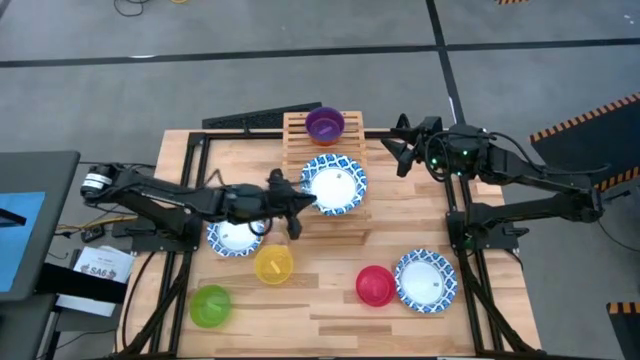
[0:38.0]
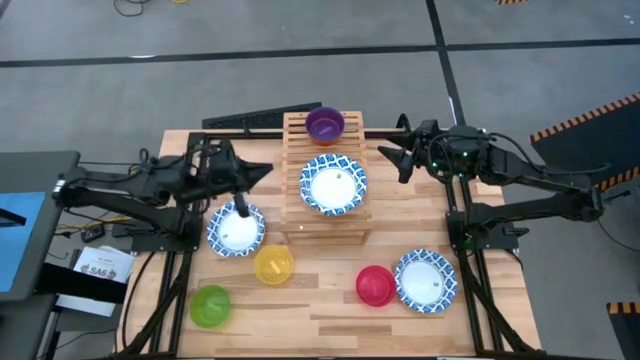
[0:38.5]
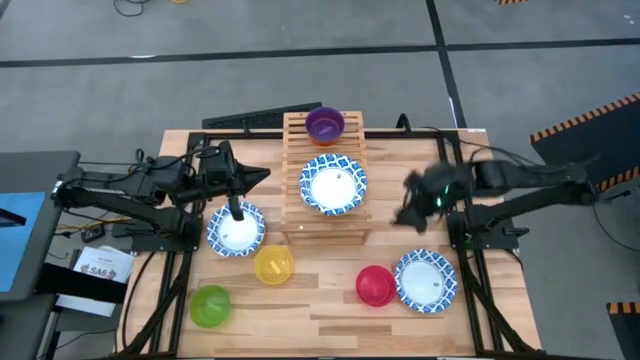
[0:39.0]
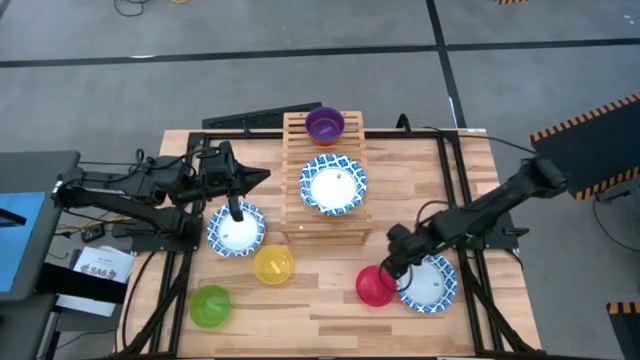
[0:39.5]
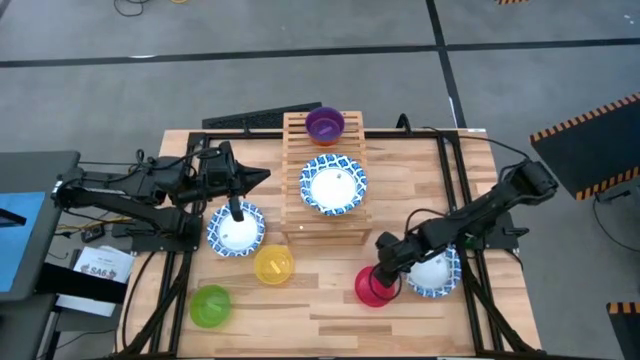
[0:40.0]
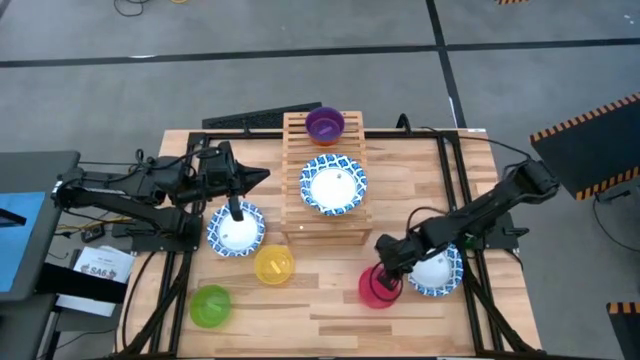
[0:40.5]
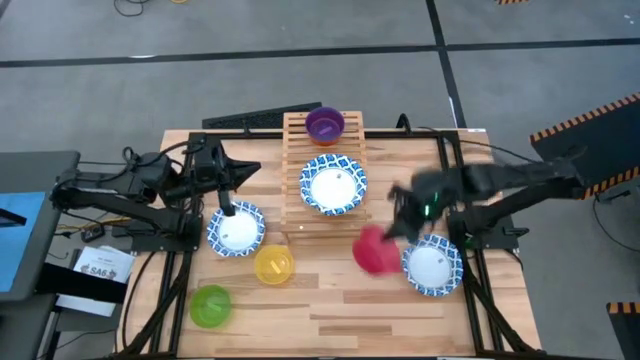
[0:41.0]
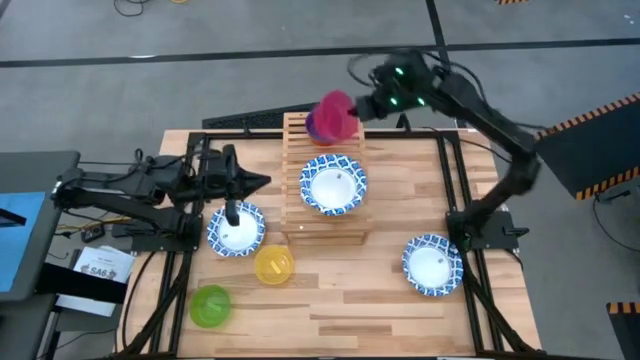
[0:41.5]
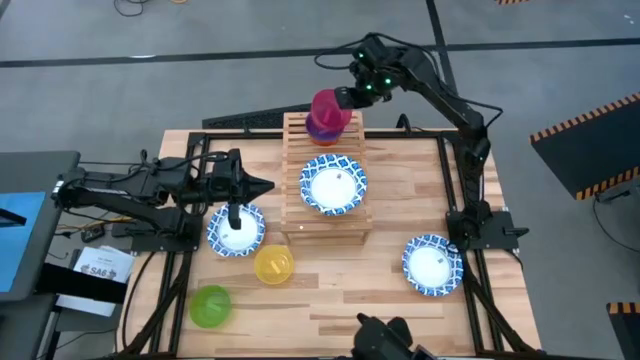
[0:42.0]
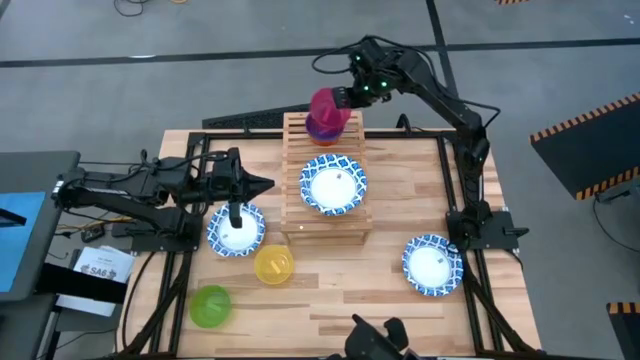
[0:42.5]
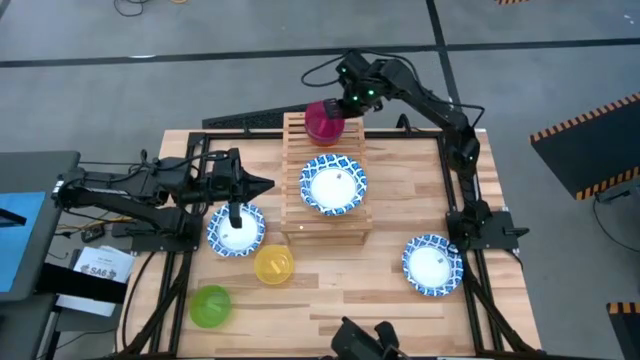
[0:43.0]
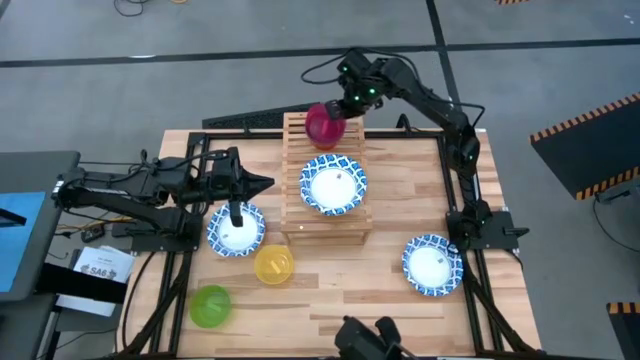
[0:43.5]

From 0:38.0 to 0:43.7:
Task: Place and stack bowls onto a shelf
Stack the red bowl on top of the violet bowl on the shelf

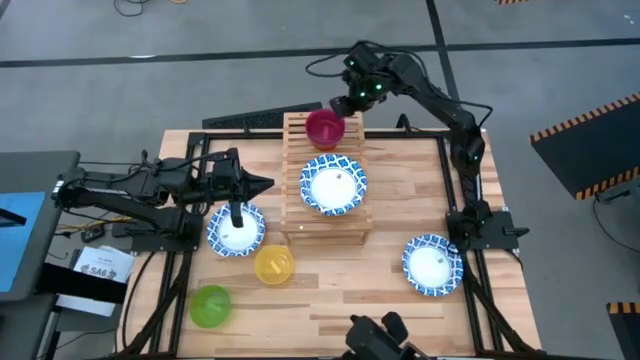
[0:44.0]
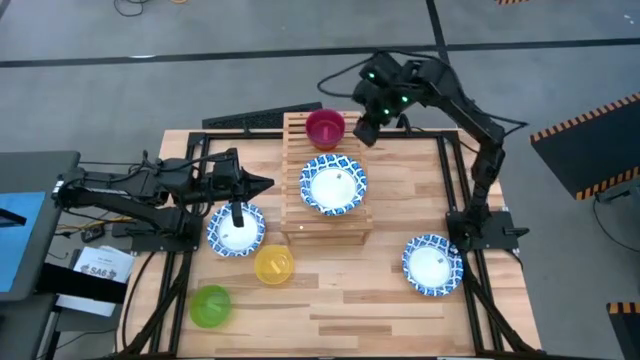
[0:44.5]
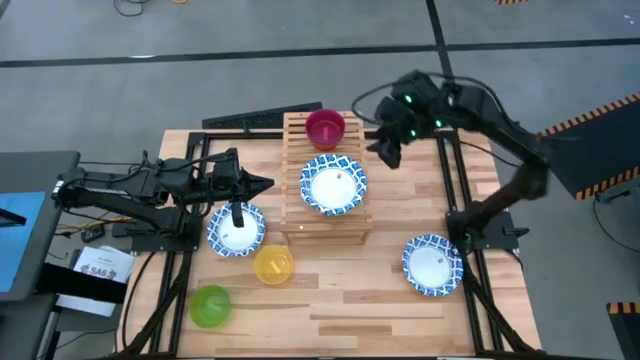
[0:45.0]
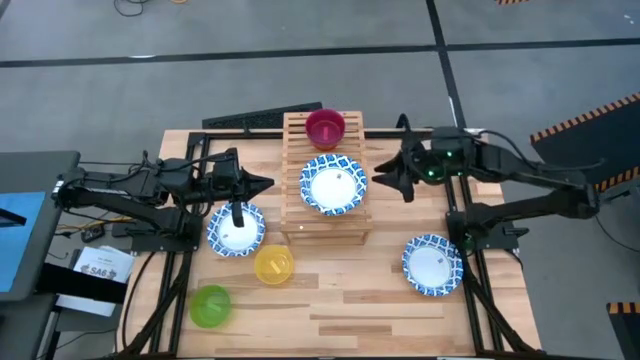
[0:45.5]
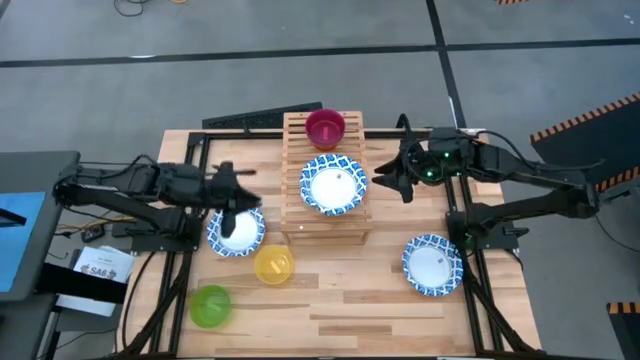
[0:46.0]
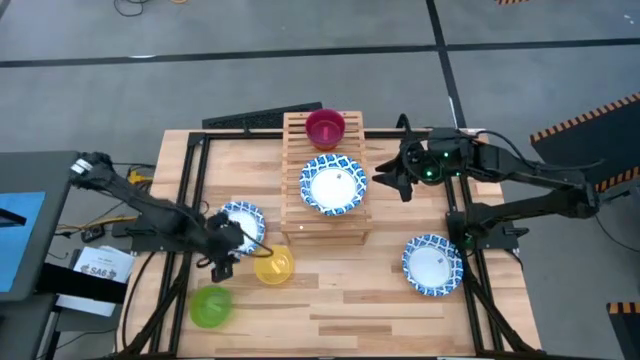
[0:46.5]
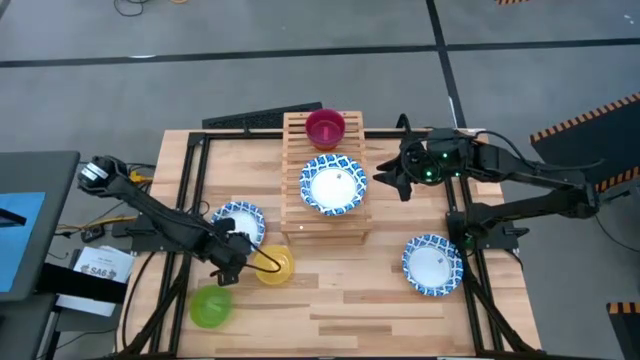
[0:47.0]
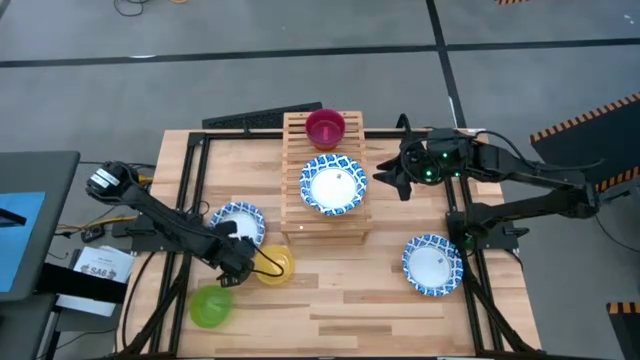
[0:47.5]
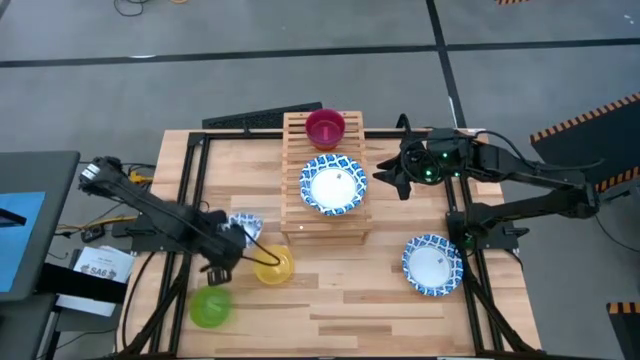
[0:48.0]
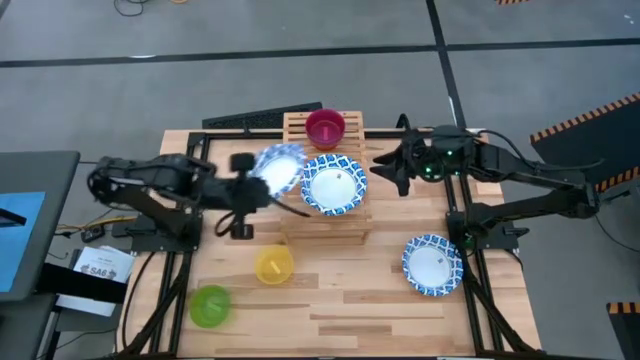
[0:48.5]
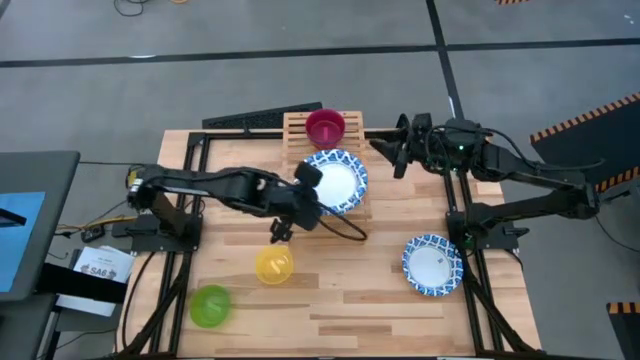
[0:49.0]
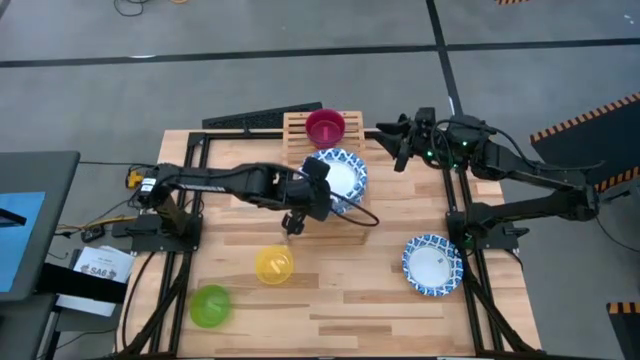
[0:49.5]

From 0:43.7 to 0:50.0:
Stack the blue patterned bowl on top of the blue patterned bowl on the shelf

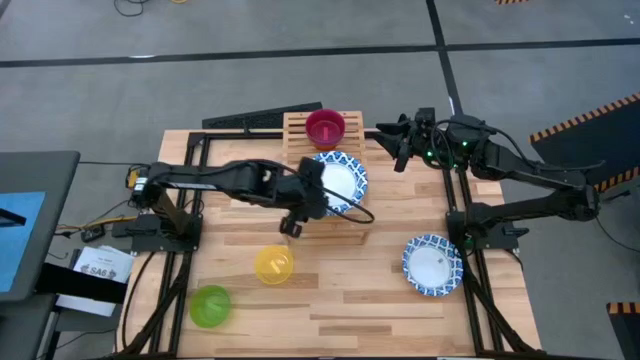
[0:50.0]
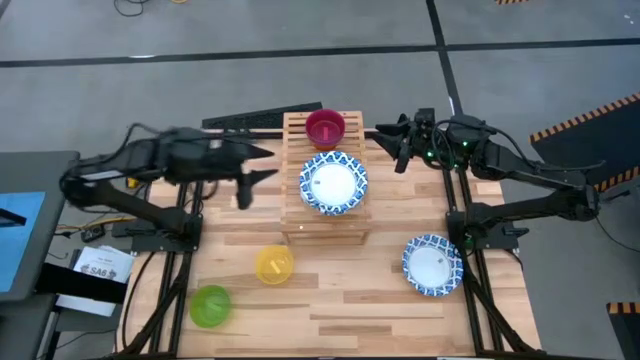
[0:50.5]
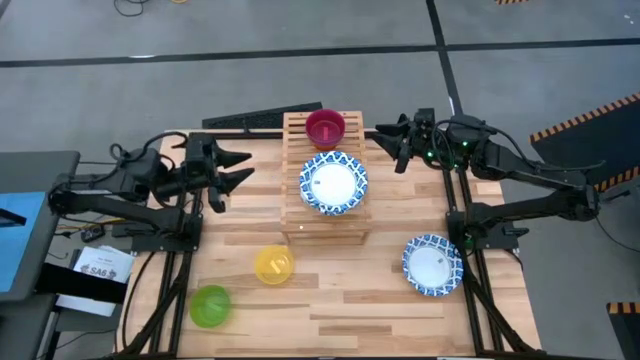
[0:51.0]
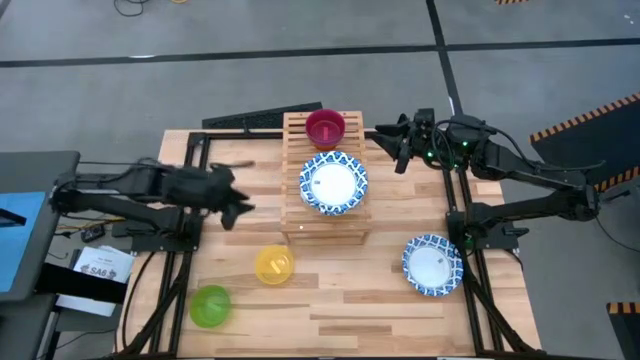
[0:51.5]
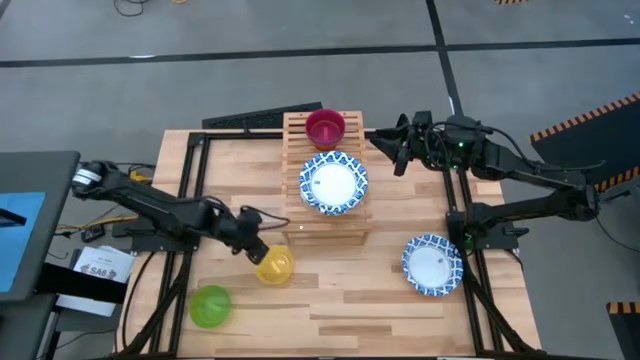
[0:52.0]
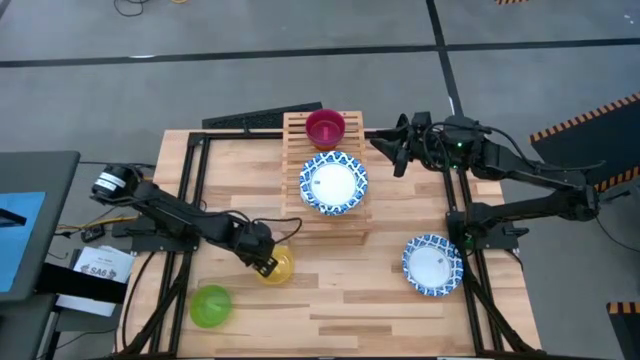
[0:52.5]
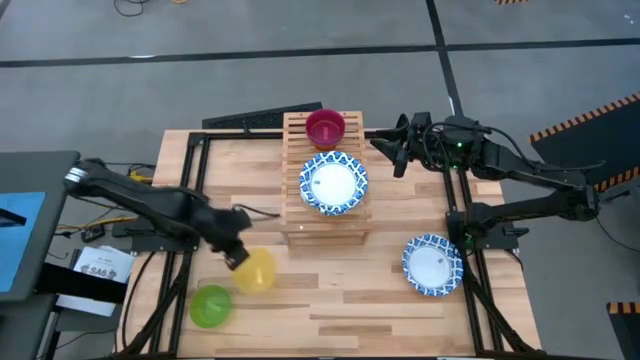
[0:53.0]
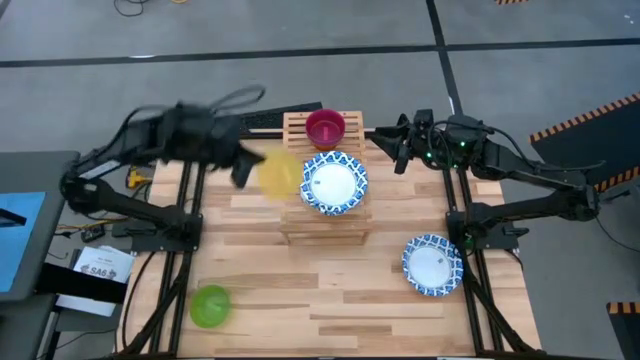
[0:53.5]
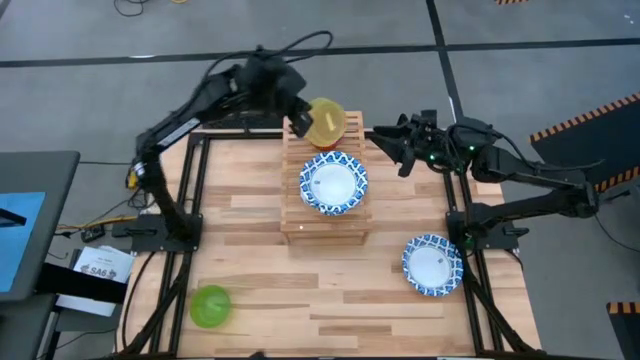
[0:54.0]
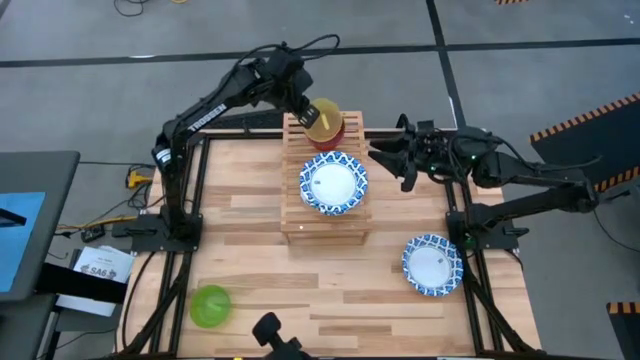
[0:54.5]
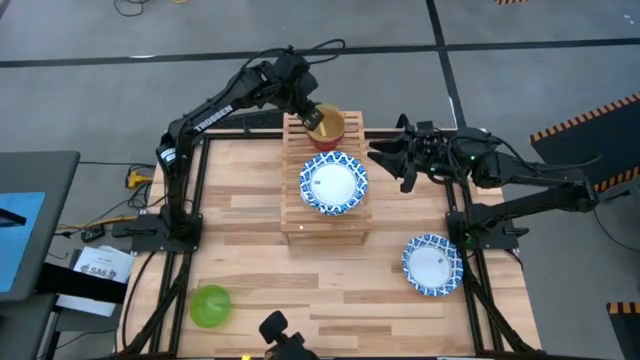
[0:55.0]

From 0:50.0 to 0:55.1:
Stack the yellow bowl on top of the red bowl on the shelf

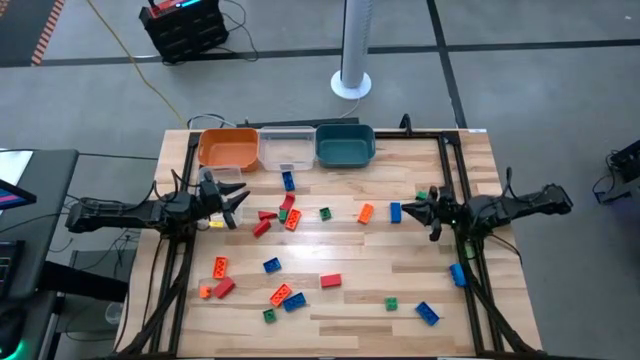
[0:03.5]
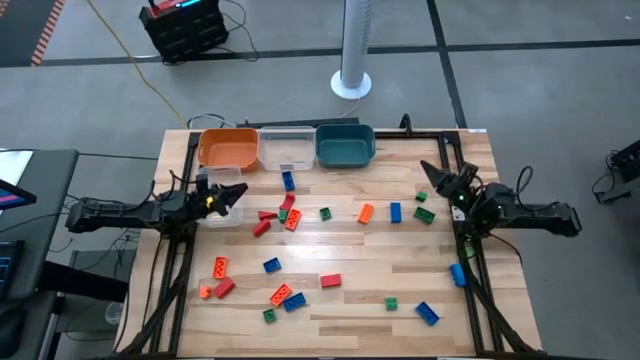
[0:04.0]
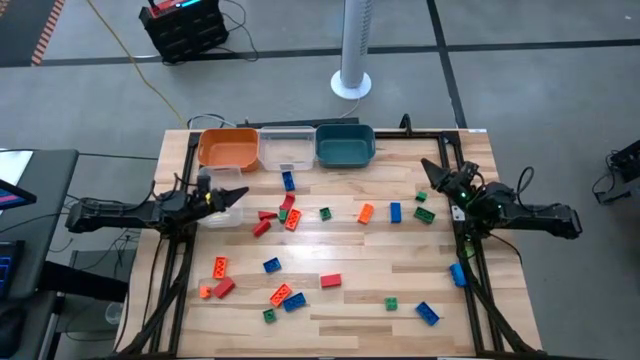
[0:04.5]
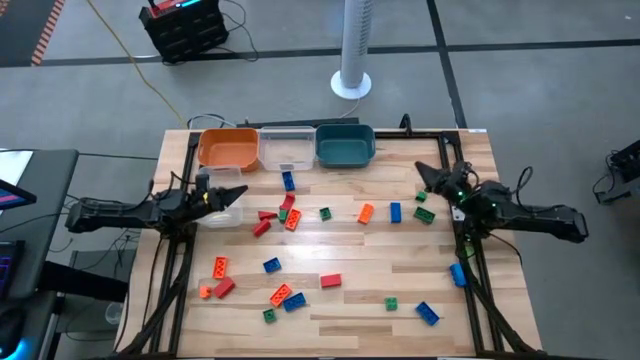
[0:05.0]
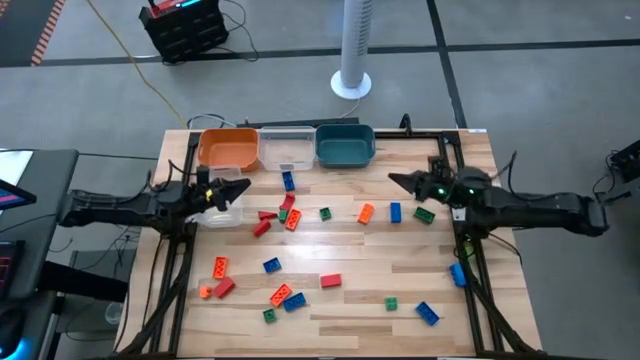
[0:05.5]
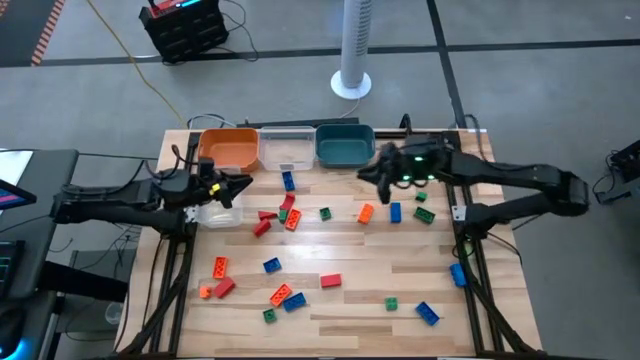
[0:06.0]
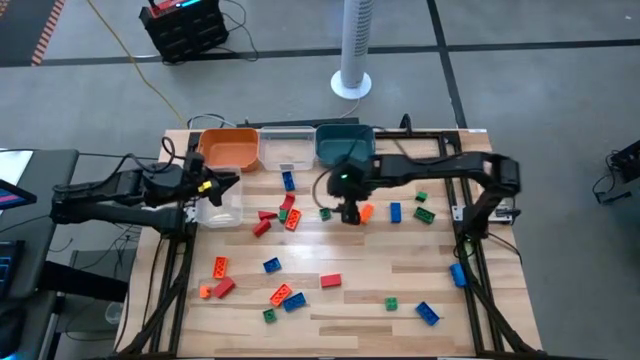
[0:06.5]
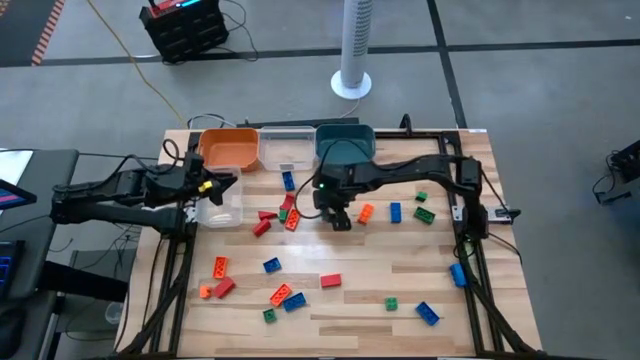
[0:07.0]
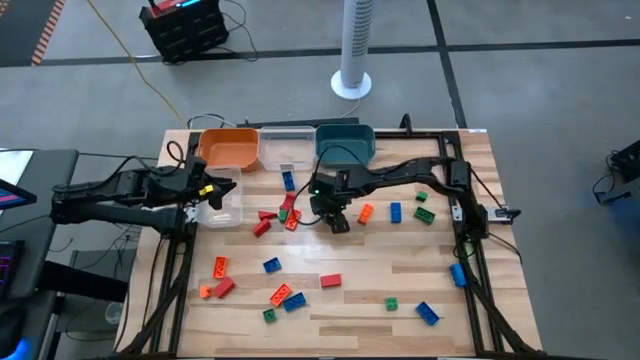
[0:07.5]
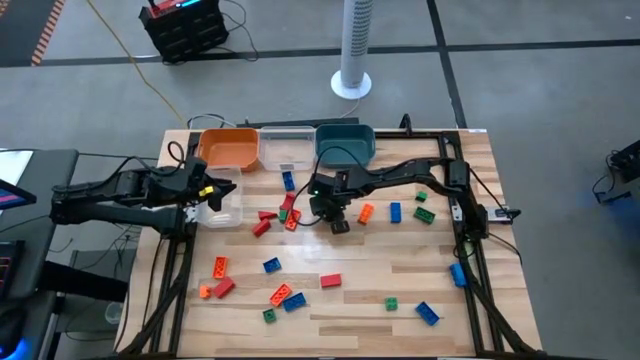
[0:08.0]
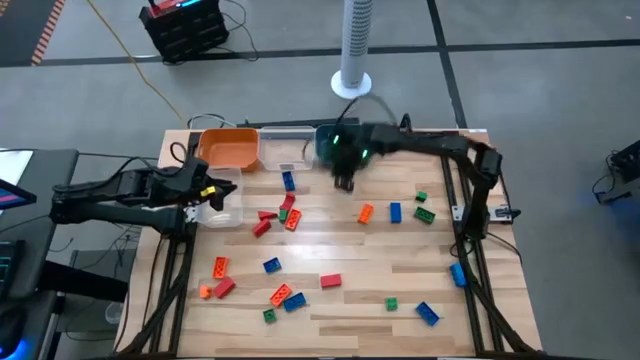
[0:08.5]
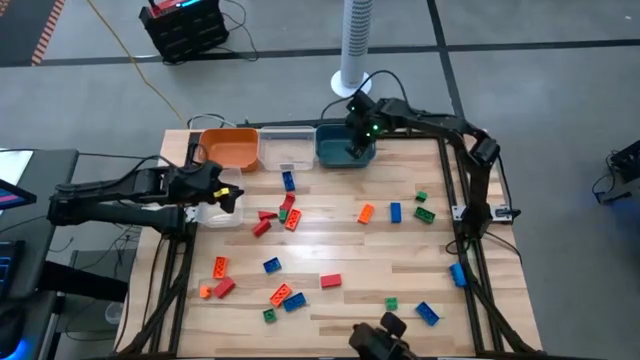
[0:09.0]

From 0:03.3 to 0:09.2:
Task: Sort blocks
Put the green game piece into the blue bin
